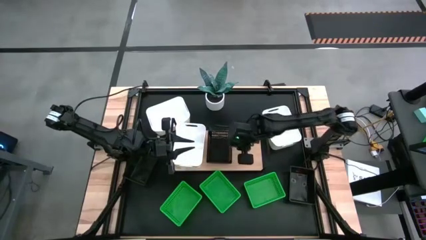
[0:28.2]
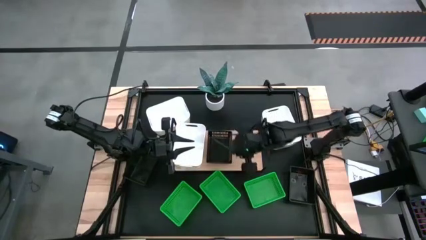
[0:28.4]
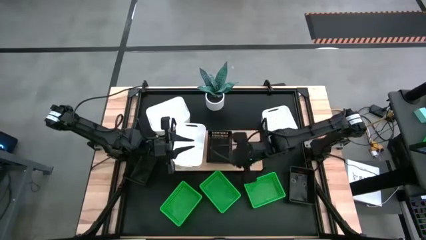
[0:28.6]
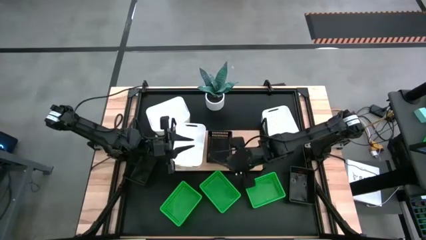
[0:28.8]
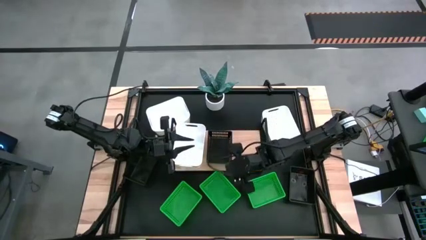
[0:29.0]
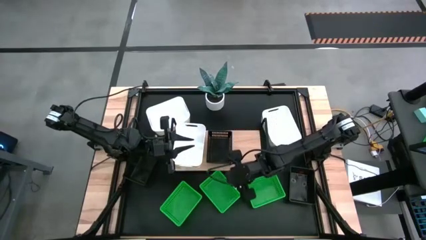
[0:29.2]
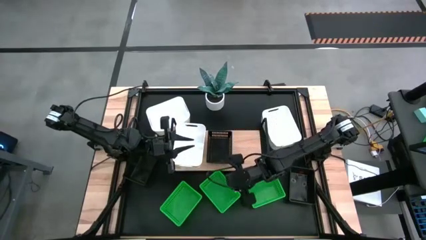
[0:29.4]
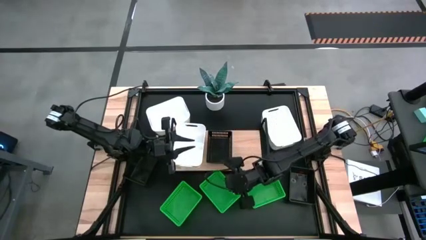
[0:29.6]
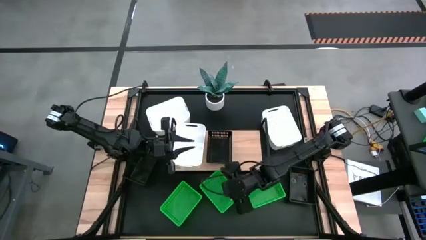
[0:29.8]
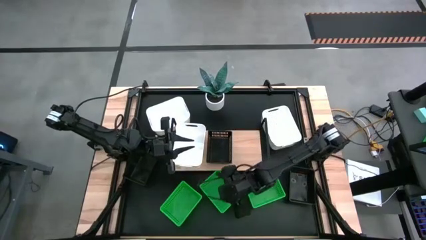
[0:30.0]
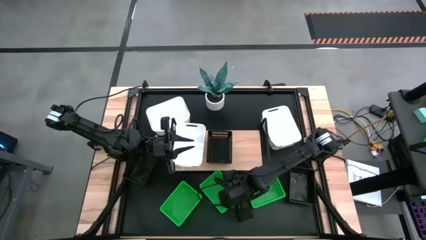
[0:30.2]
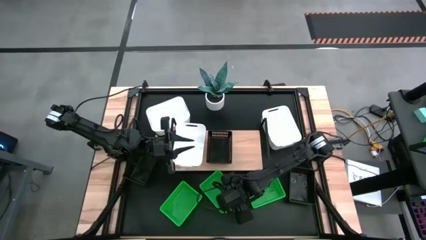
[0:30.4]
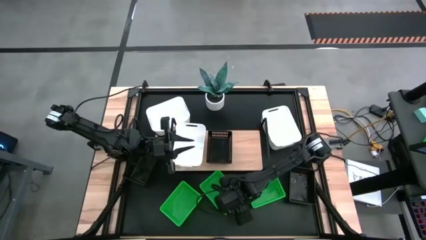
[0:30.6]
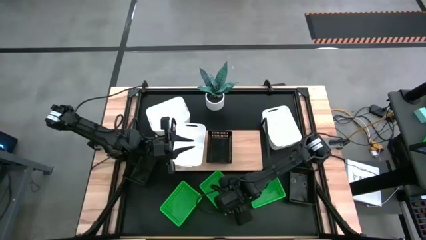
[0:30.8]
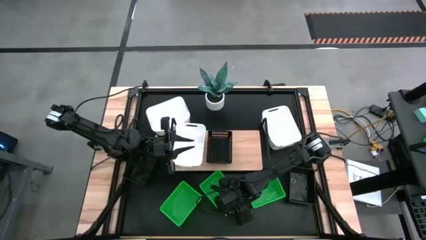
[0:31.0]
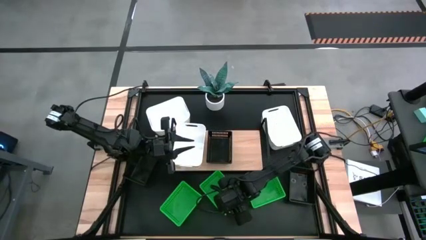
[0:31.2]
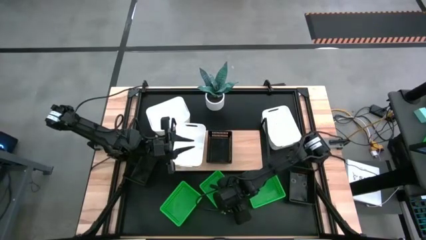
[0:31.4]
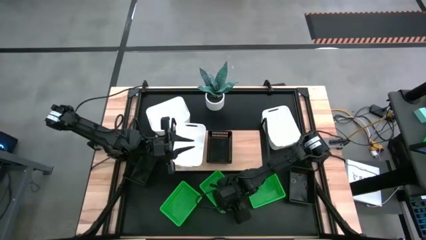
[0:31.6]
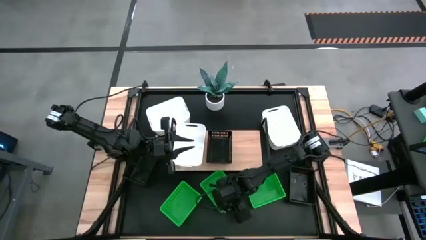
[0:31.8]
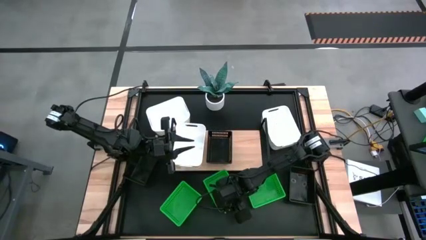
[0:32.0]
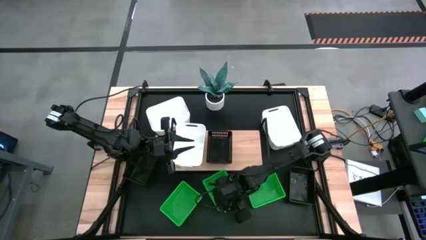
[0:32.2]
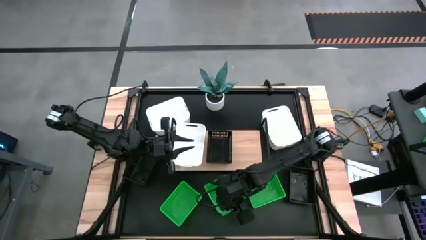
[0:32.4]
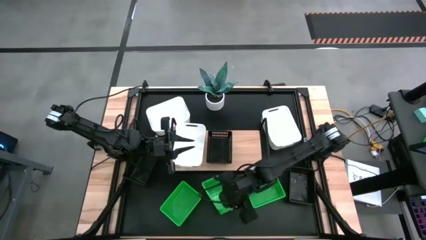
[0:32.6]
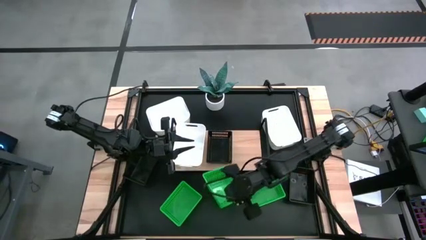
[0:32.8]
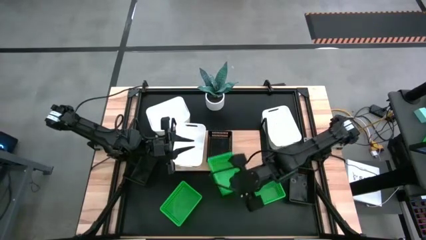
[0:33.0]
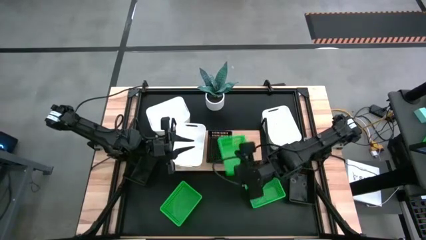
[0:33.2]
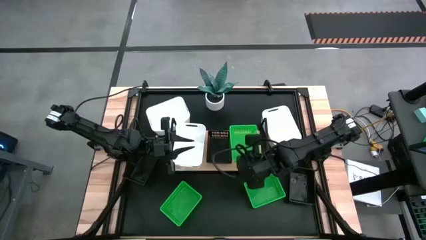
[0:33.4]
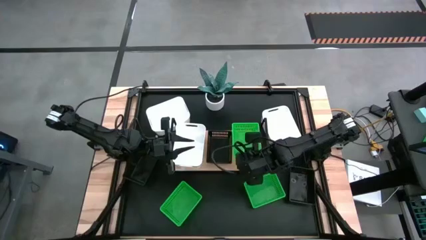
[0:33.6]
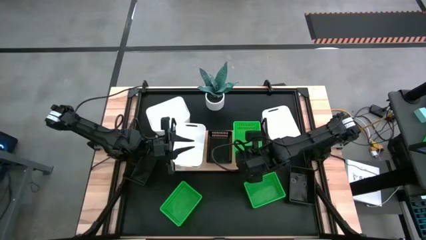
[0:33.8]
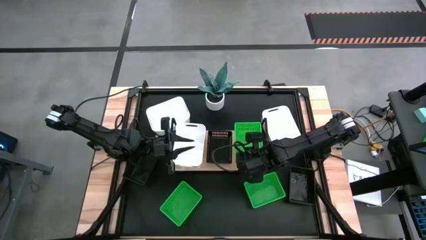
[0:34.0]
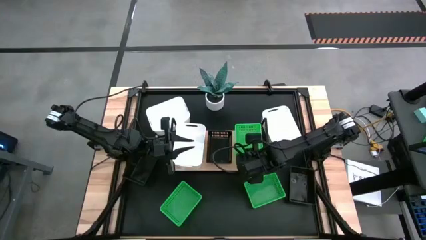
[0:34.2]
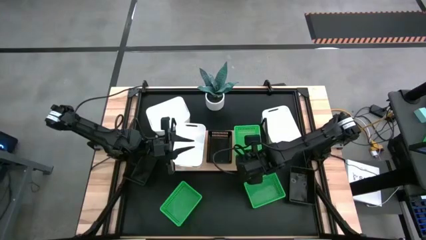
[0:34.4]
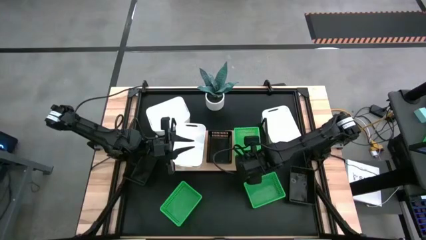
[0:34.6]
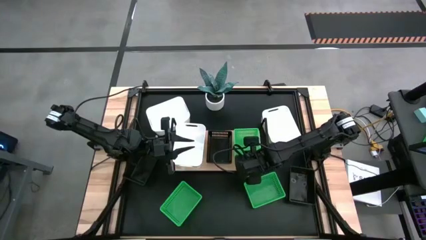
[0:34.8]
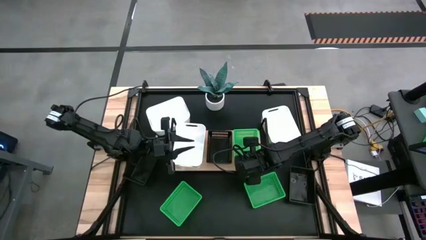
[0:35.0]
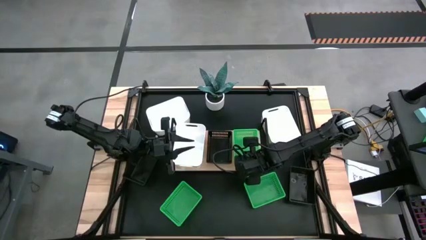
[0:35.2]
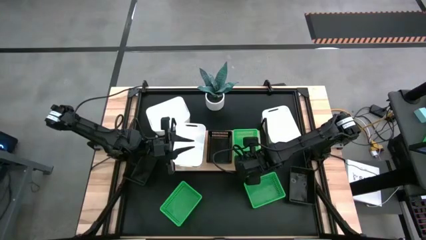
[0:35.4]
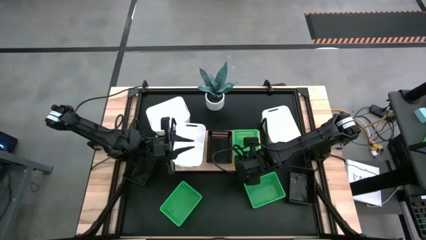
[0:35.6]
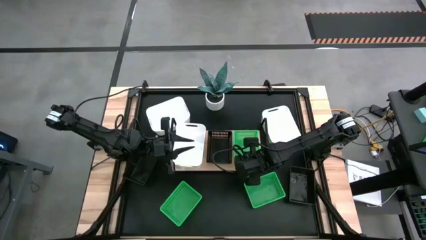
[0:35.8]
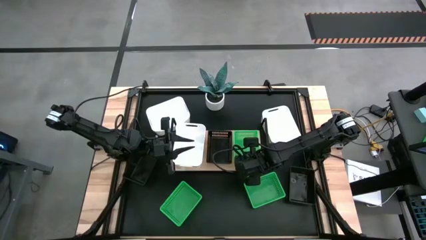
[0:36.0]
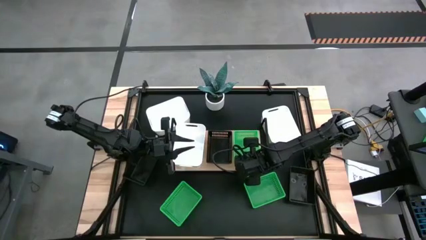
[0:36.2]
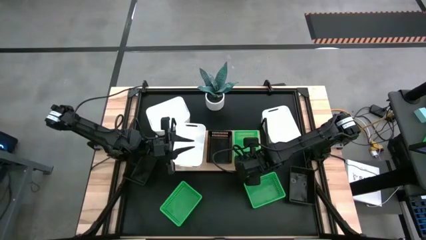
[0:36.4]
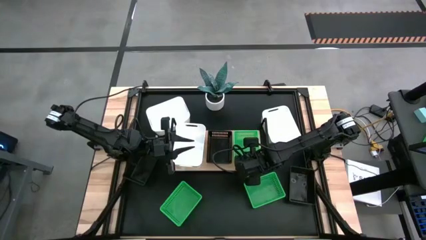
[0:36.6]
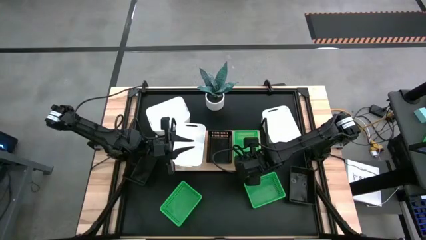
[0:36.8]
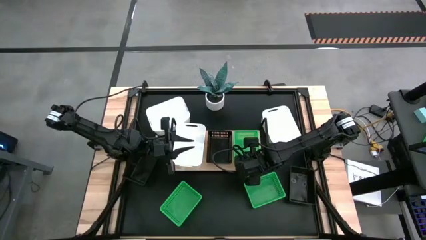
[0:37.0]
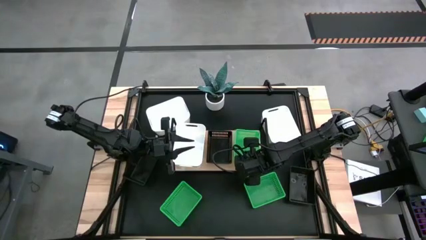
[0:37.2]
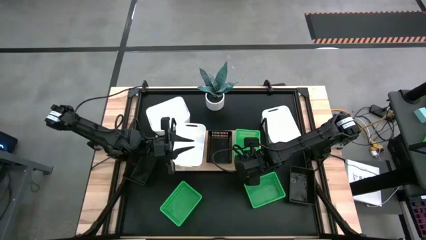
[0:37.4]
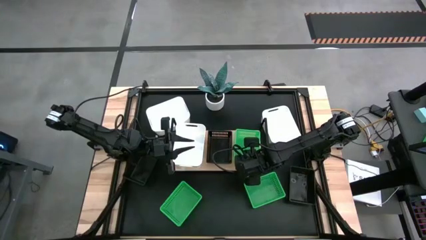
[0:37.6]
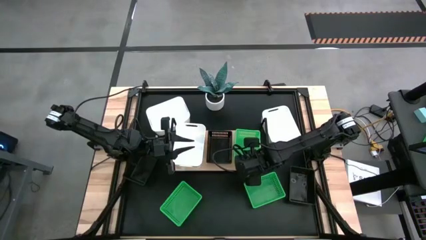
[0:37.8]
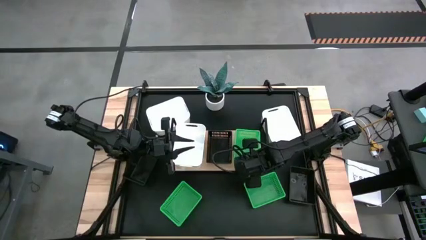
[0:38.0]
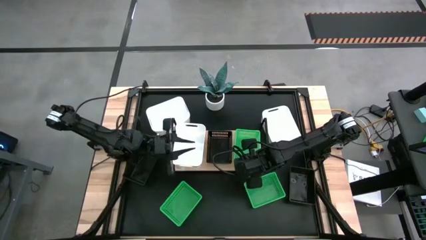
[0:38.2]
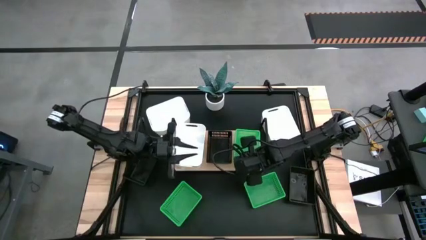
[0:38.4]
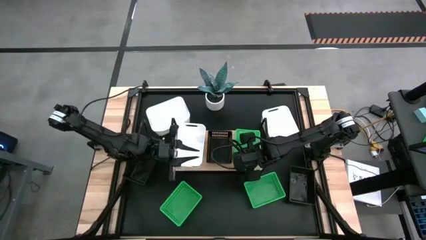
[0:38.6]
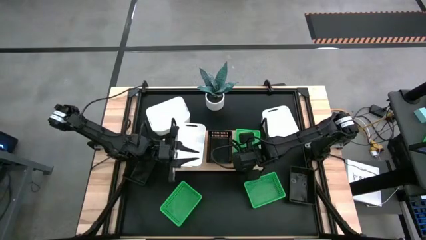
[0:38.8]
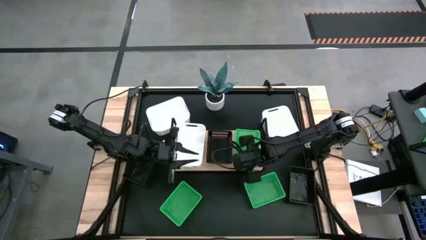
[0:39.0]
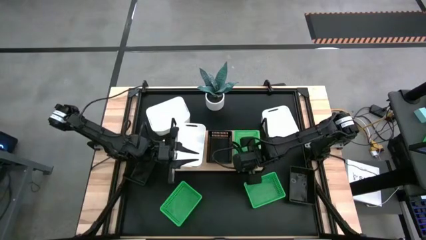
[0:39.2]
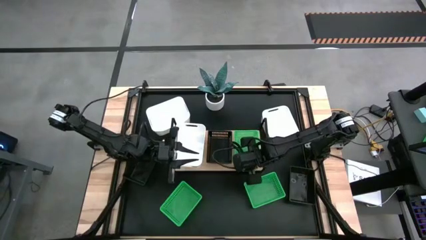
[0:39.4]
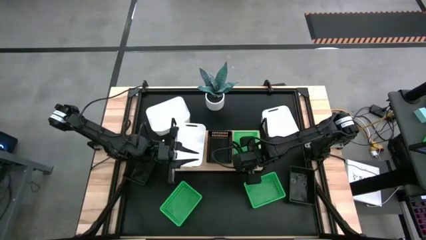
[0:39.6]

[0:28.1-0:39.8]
Task: Stack baskets on shelf by color
Put the middle green bin on the shelf

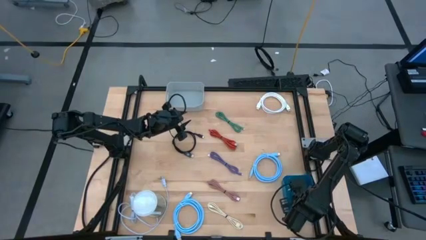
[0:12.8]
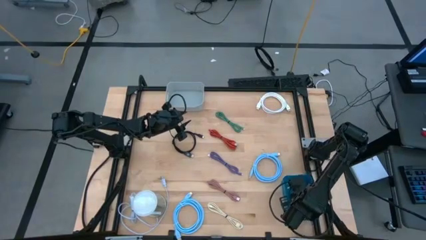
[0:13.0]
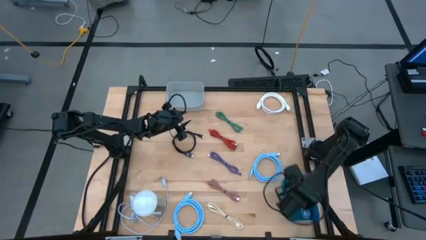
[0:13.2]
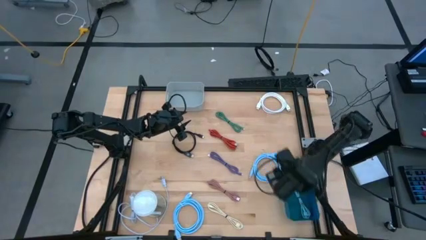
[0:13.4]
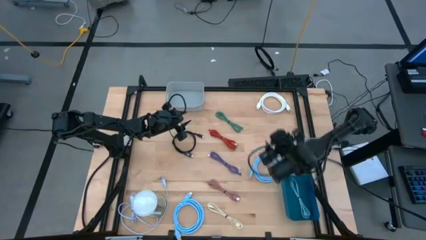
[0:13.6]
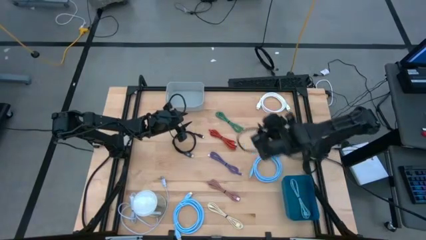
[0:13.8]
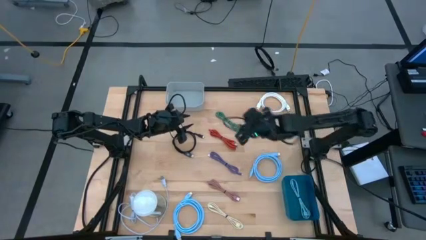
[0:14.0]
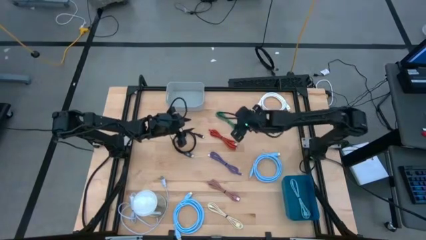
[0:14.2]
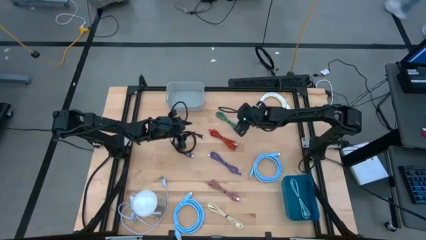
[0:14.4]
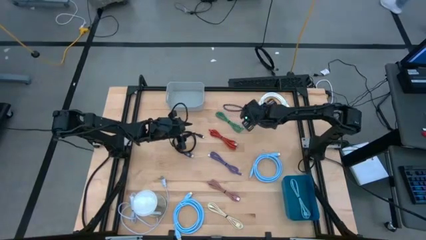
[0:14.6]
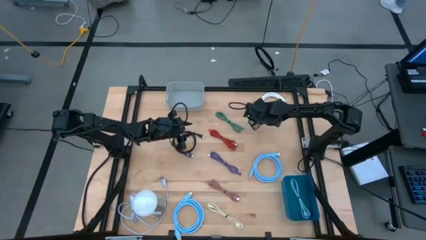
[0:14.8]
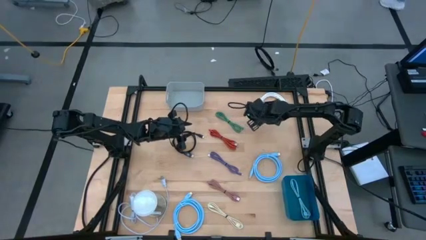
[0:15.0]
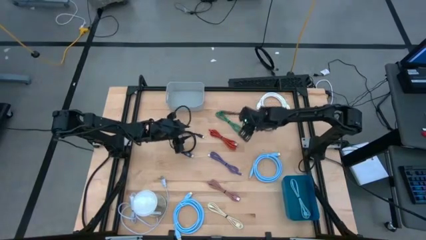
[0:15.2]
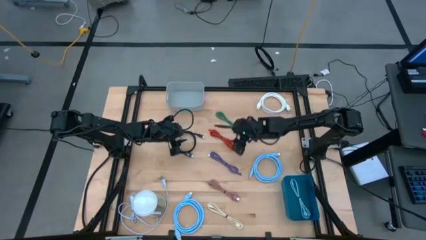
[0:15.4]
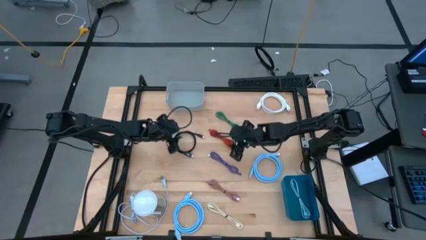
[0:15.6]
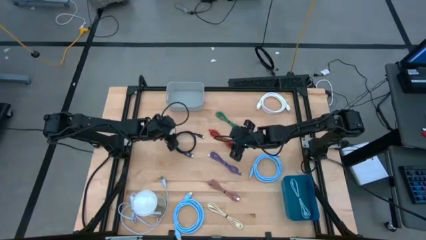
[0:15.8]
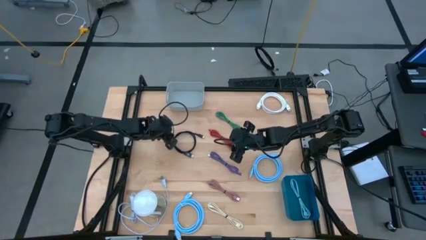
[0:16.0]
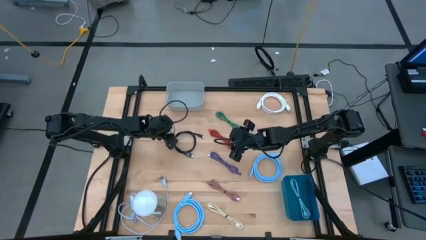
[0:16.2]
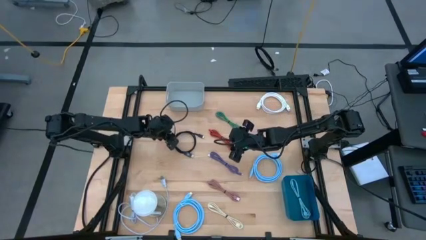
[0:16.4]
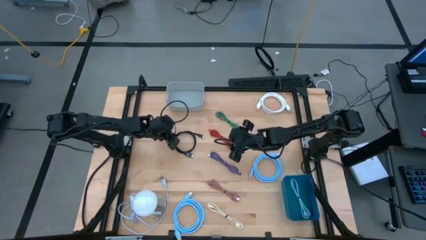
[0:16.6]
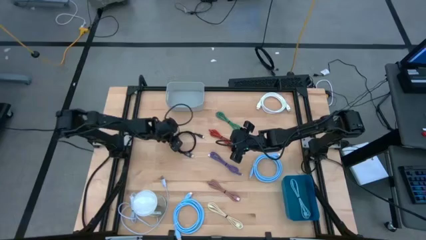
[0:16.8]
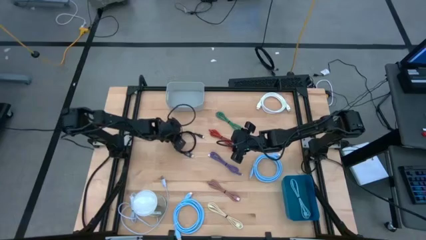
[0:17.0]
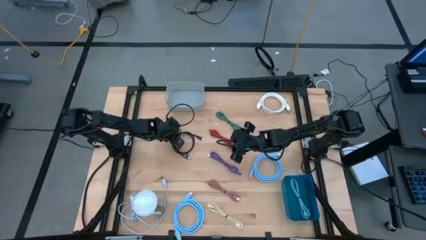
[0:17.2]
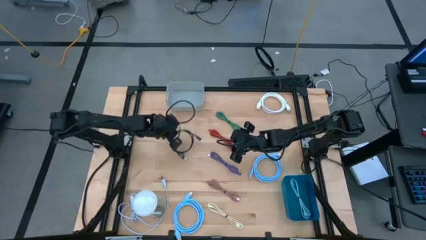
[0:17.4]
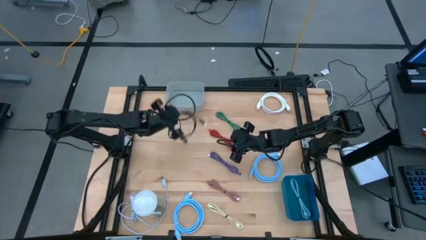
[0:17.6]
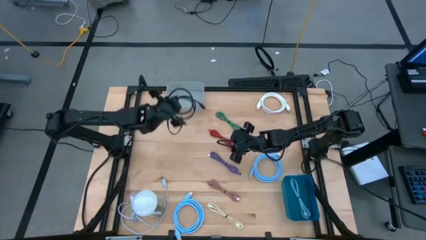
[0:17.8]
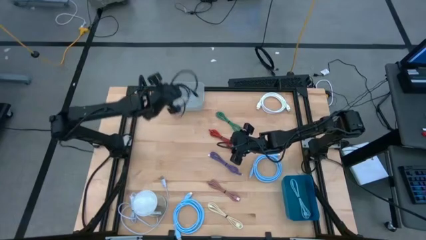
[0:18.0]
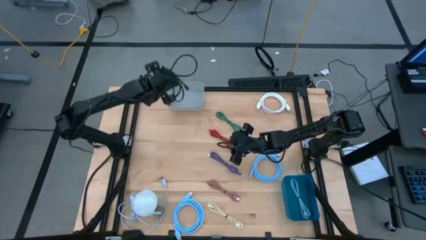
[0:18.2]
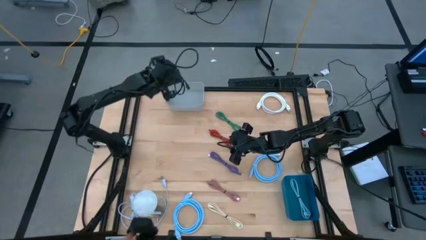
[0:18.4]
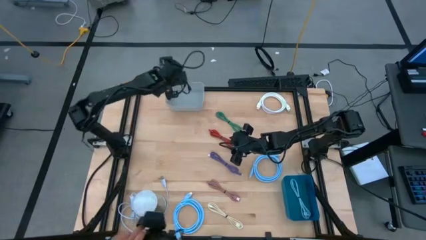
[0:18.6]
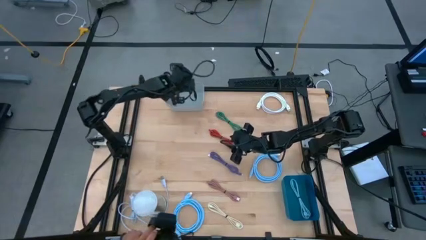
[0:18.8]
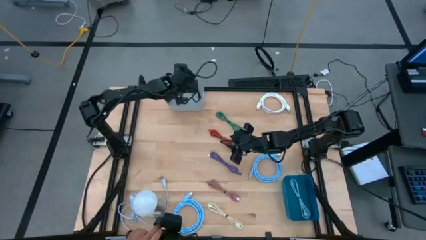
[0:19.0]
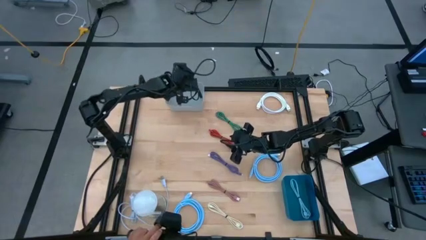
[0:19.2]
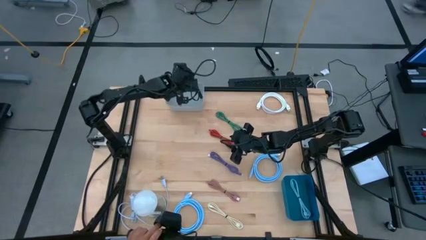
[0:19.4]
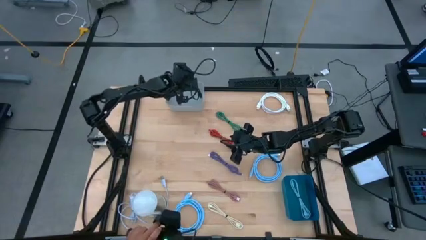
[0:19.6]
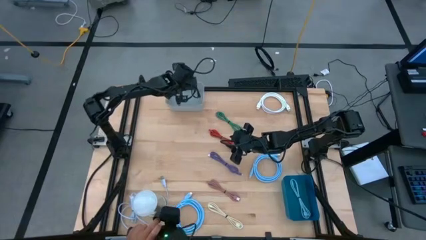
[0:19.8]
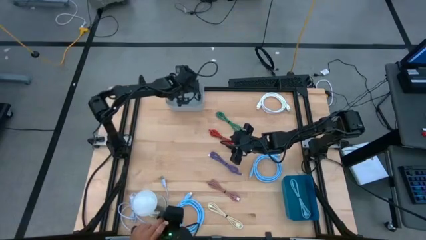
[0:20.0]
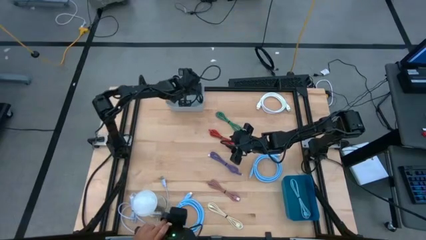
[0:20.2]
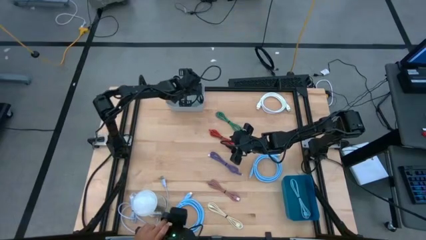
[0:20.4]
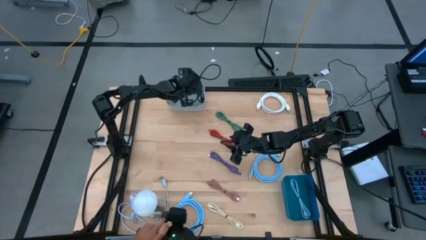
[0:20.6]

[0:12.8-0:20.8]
Task: Pick & Place USB Port
Put the black HDMI cable into the gray bin
